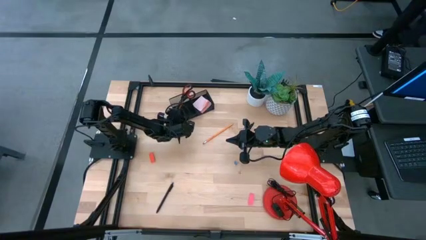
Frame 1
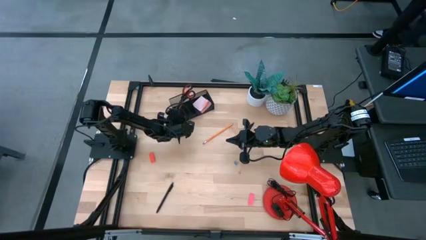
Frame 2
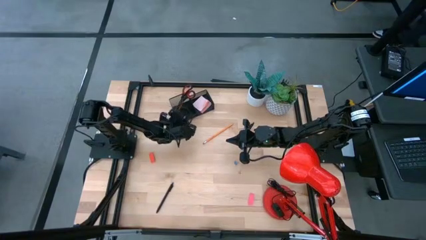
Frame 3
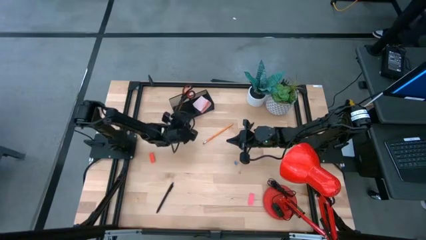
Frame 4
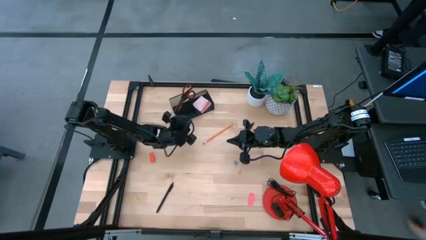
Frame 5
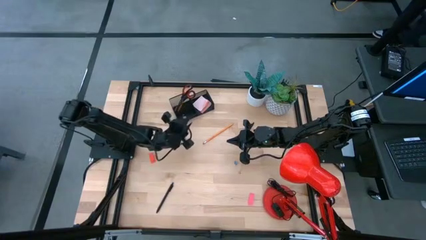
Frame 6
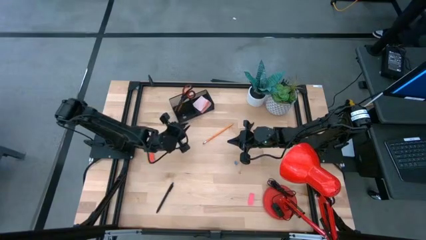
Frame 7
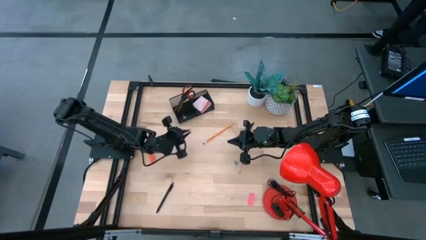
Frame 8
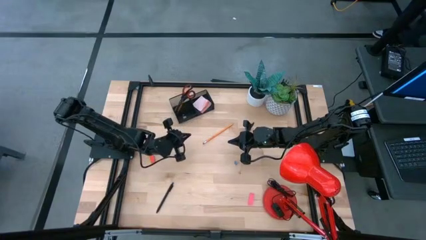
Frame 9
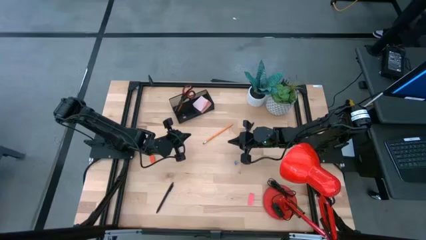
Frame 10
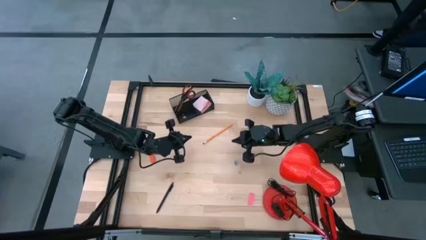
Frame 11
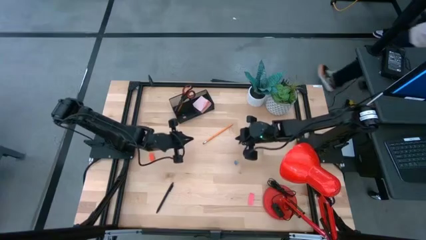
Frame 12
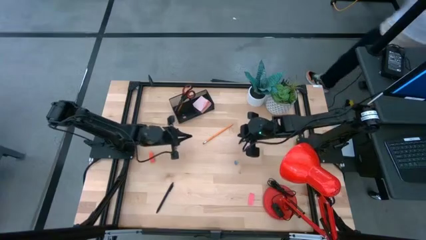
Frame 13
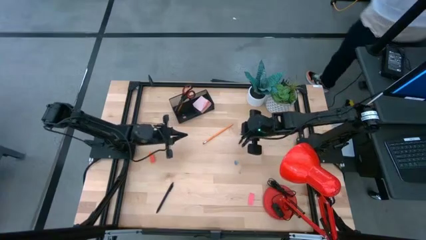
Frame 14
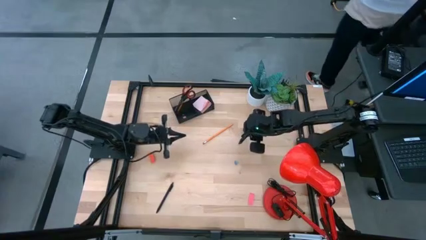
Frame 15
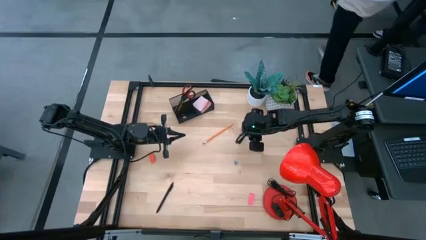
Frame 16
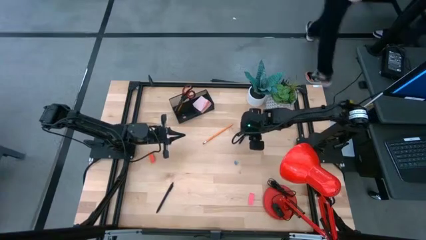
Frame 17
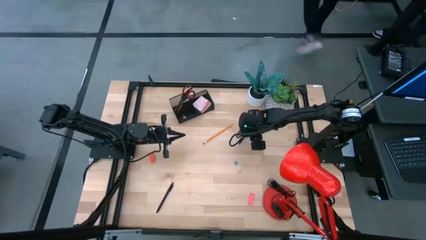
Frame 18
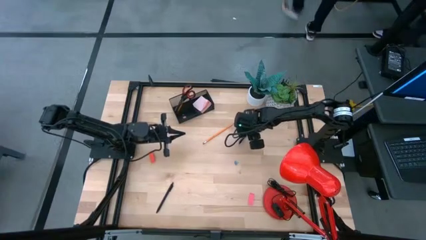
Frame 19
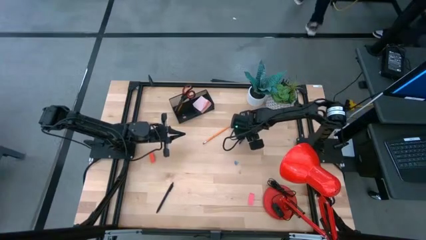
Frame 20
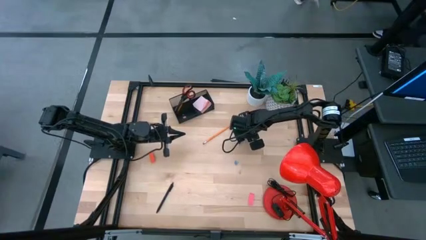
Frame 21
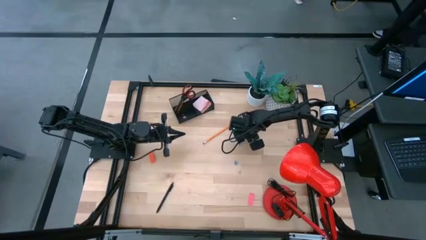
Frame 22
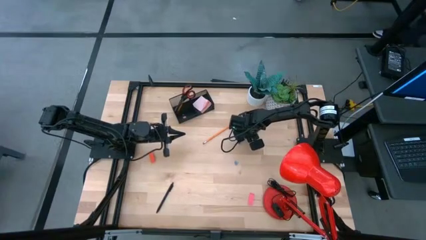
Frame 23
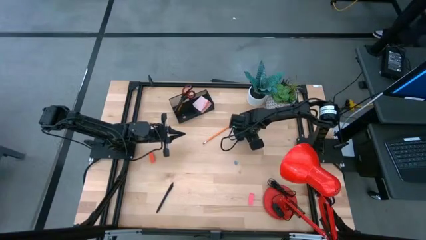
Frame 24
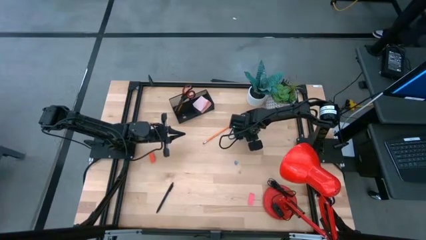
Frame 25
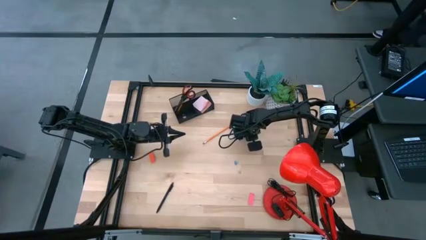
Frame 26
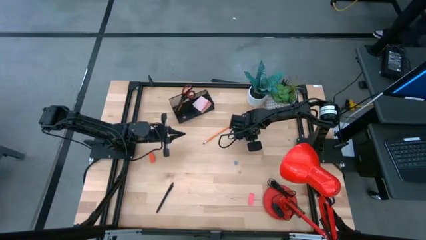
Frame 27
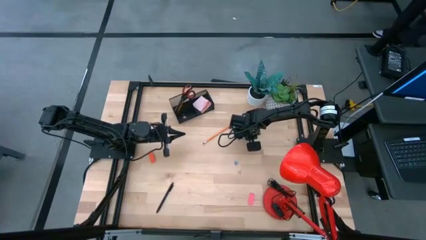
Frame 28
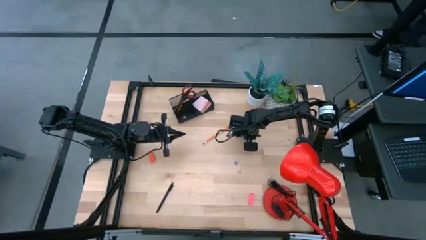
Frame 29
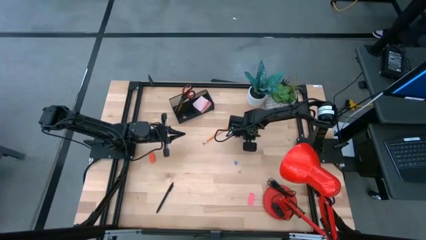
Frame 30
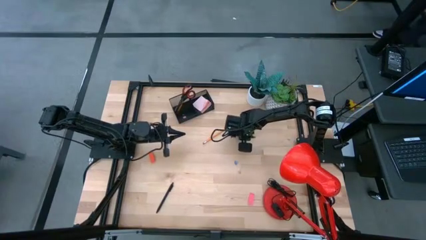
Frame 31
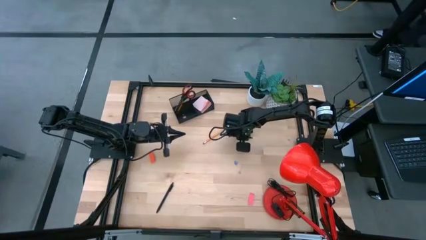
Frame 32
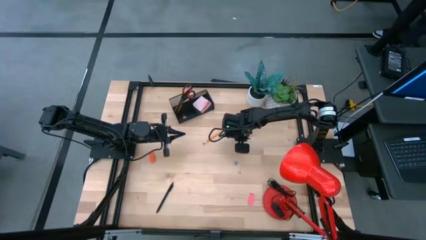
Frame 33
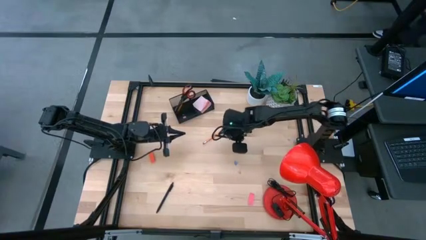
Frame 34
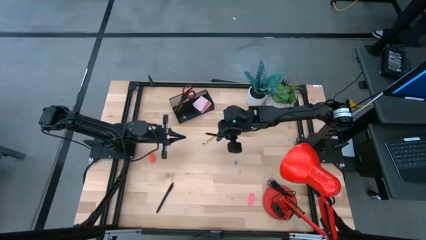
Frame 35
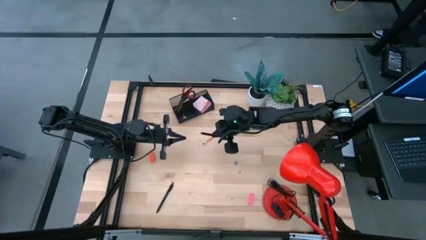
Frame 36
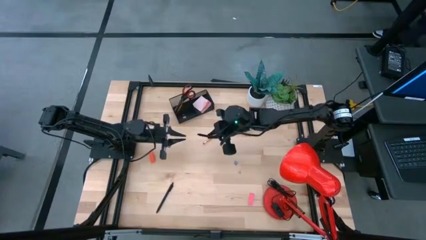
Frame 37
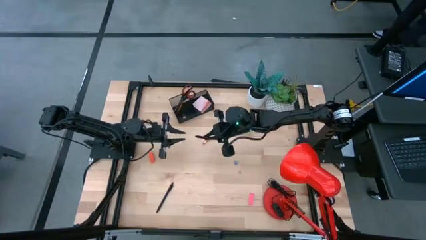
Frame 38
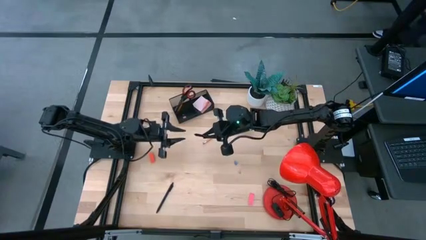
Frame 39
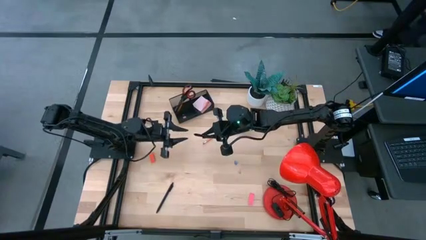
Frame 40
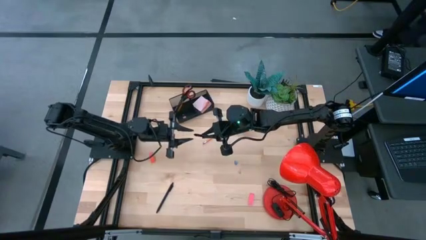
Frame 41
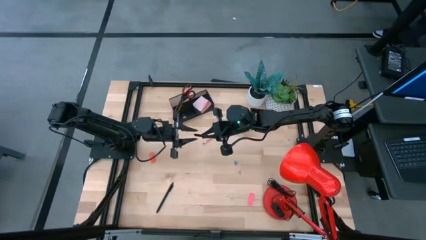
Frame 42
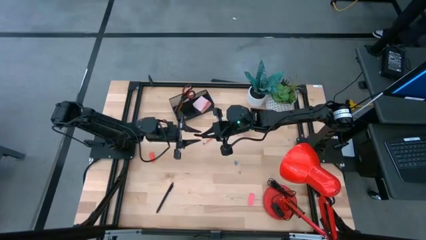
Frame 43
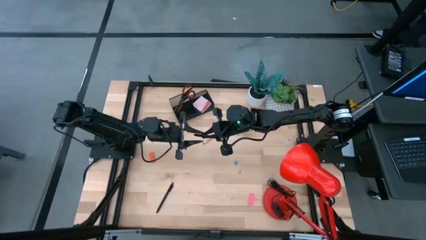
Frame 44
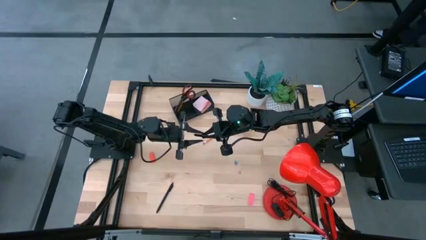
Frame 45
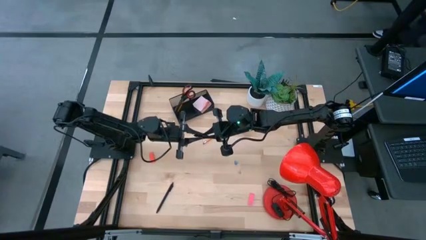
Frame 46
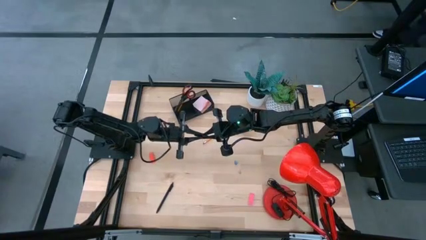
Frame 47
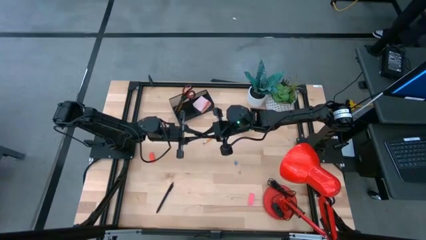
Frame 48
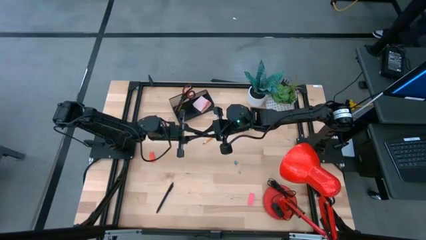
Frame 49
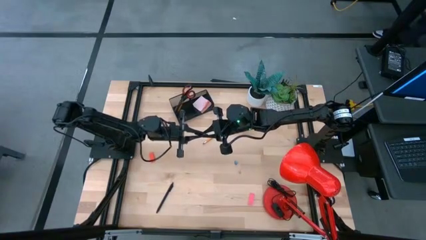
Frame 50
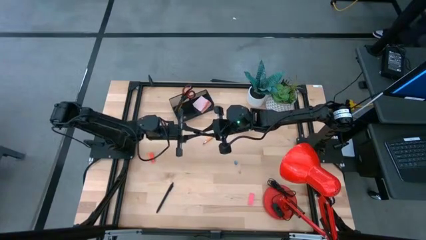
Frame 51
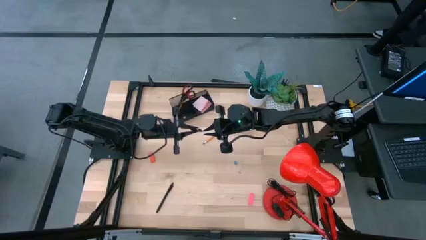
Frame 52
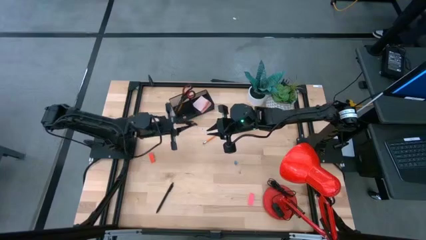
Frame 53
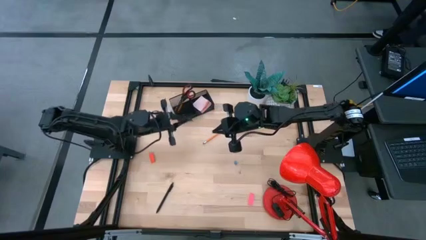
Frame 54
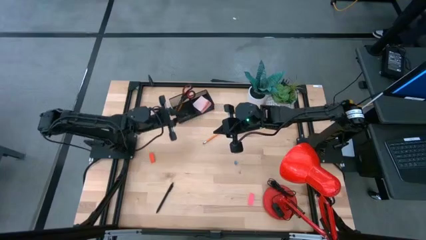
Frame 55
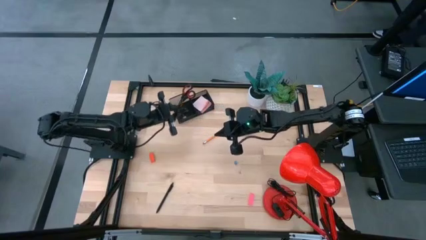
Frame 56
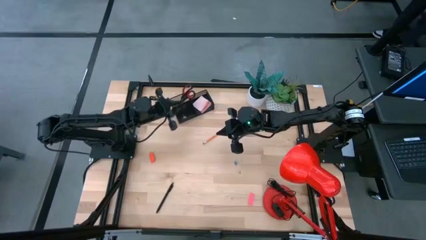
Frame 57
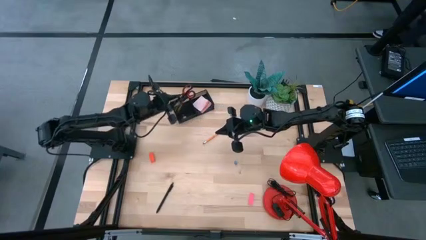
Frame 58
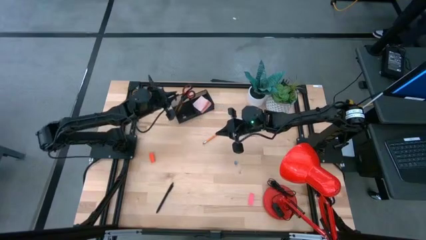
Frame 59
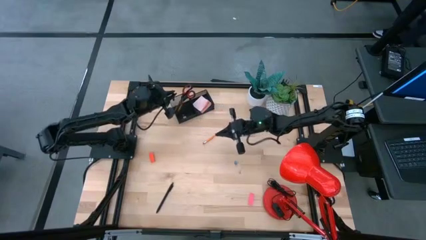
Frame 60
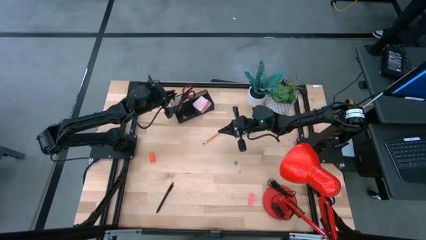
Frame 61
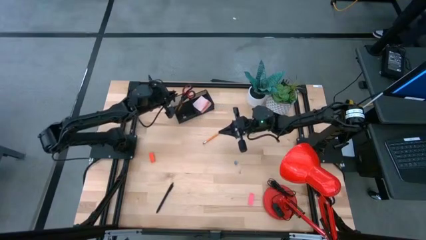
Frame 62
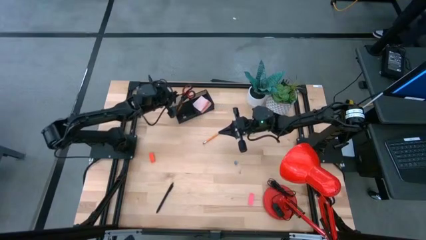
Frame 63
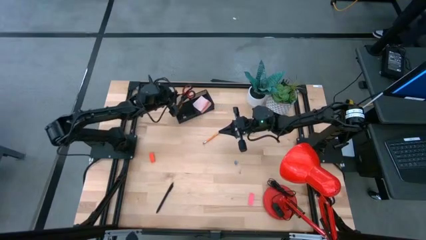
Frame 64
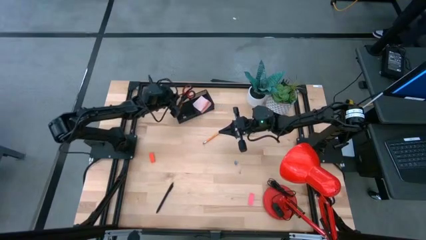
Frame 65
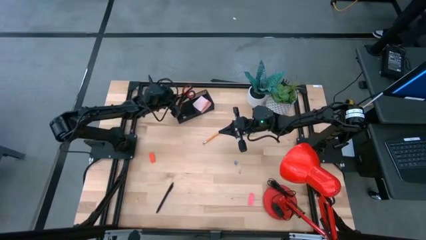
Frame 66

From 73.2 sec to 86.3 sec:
Task: Pick and place office supplies into organizer
Put the top pen into the desk organizer
